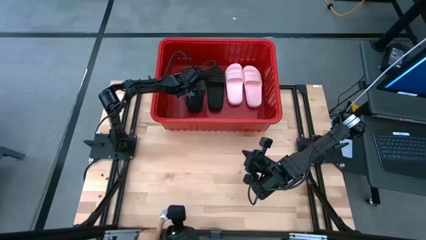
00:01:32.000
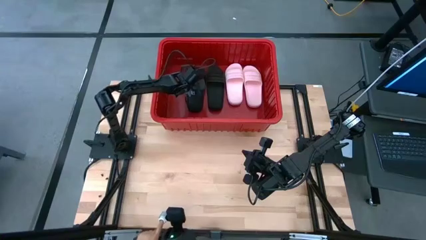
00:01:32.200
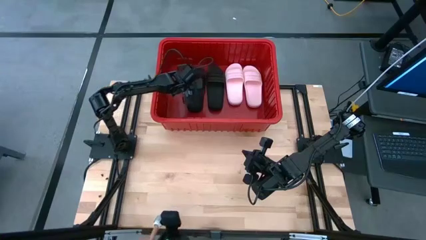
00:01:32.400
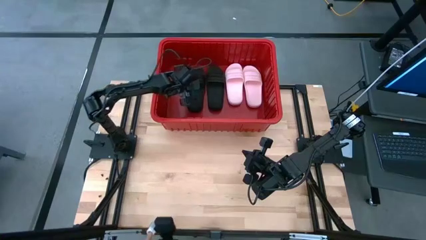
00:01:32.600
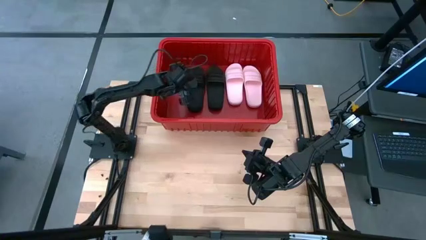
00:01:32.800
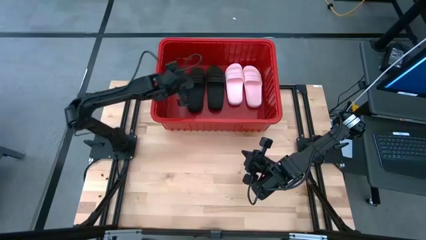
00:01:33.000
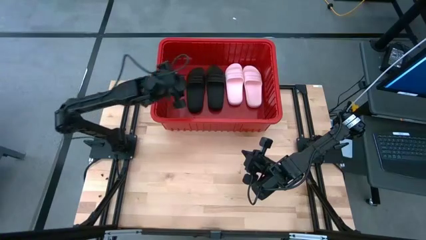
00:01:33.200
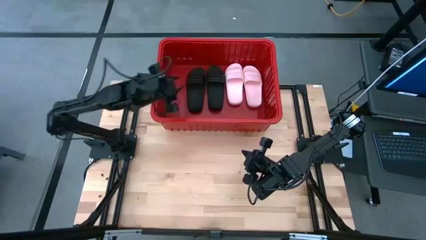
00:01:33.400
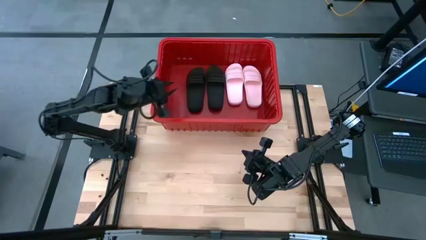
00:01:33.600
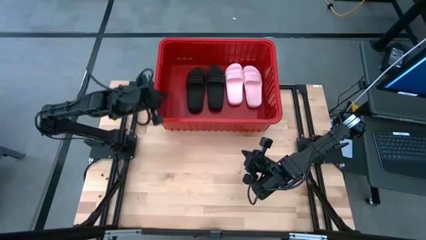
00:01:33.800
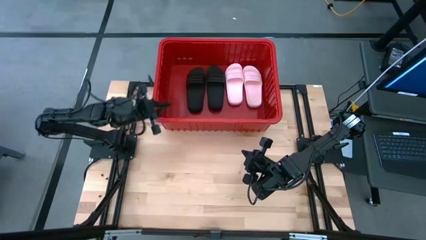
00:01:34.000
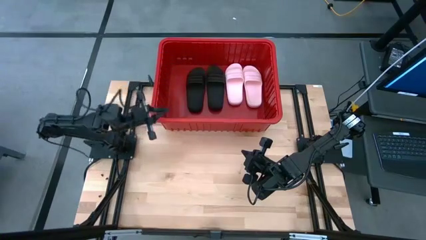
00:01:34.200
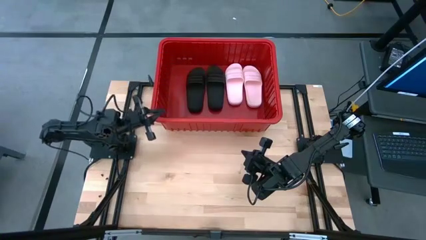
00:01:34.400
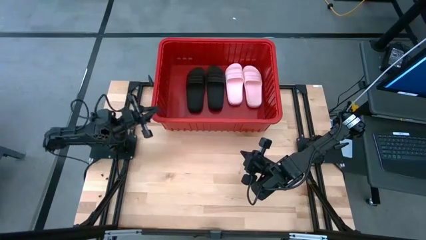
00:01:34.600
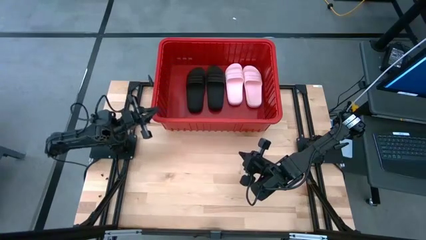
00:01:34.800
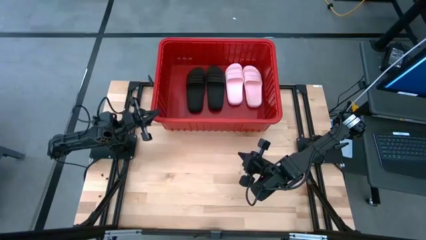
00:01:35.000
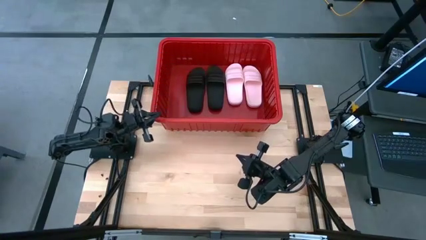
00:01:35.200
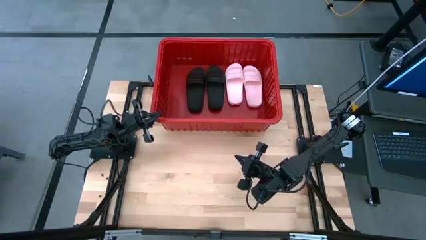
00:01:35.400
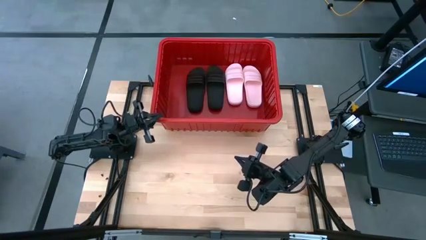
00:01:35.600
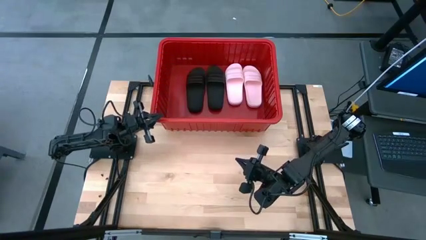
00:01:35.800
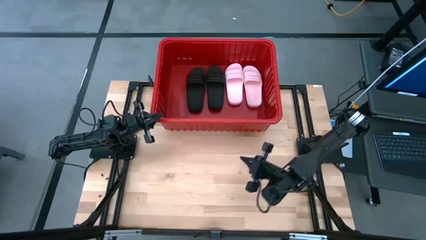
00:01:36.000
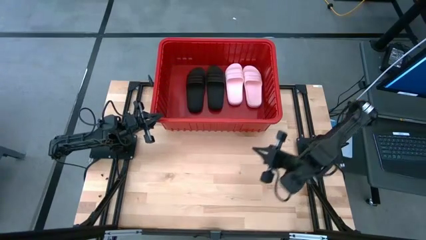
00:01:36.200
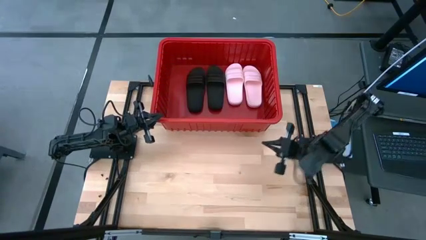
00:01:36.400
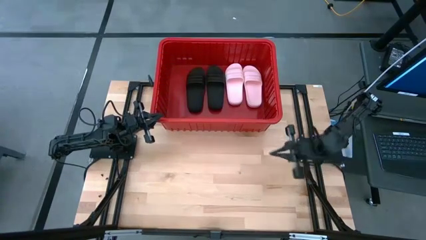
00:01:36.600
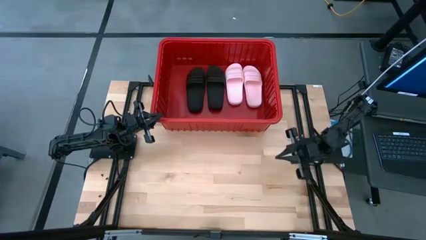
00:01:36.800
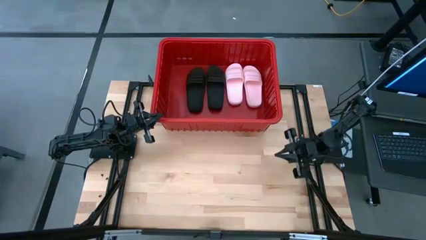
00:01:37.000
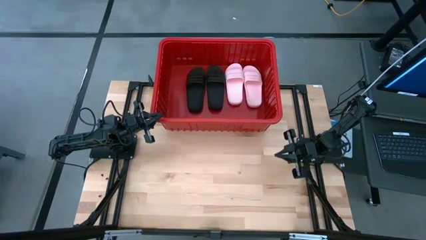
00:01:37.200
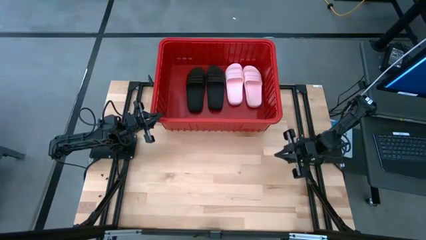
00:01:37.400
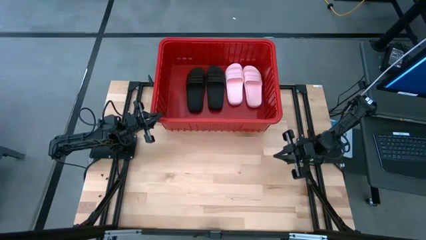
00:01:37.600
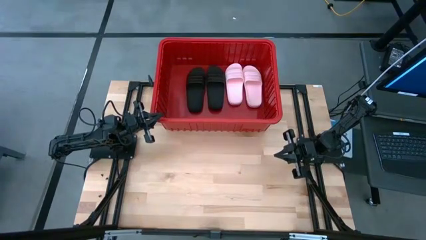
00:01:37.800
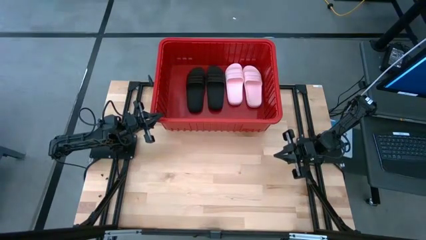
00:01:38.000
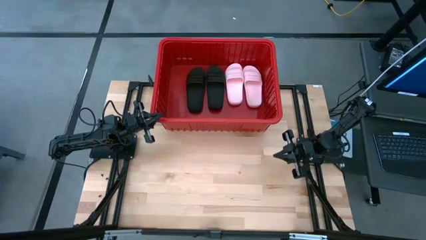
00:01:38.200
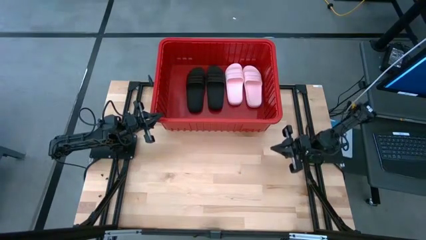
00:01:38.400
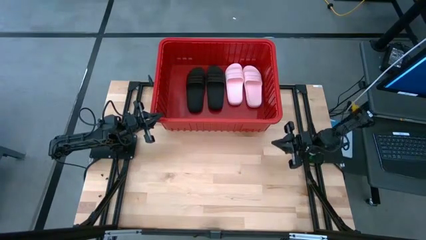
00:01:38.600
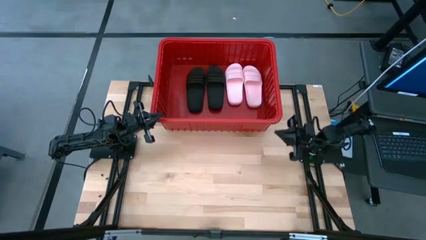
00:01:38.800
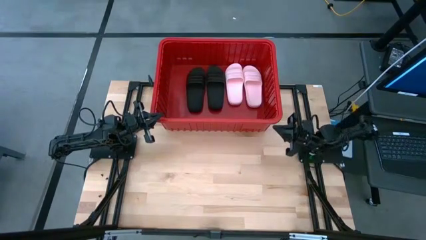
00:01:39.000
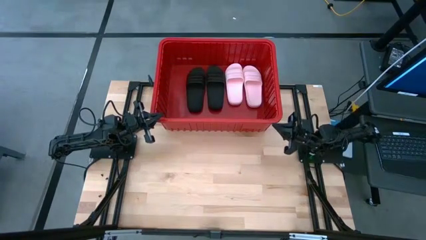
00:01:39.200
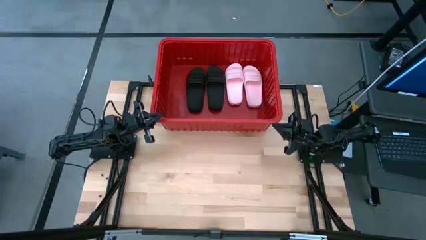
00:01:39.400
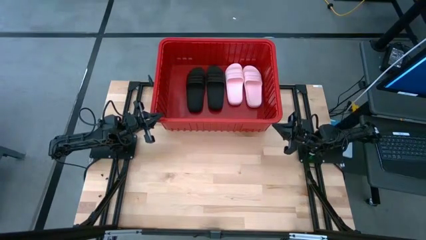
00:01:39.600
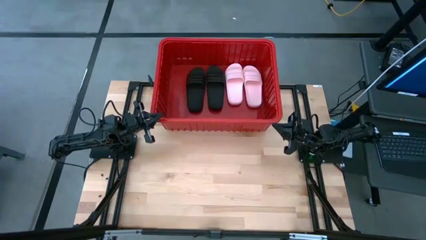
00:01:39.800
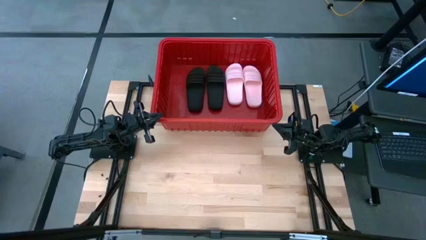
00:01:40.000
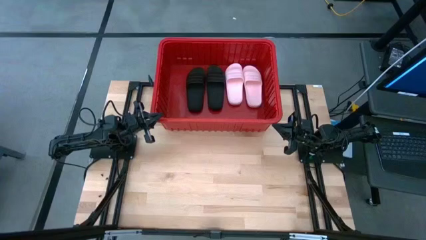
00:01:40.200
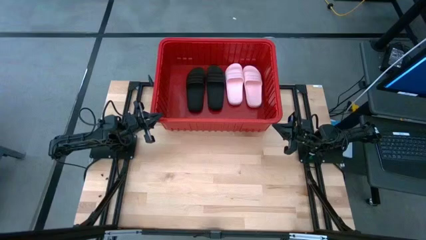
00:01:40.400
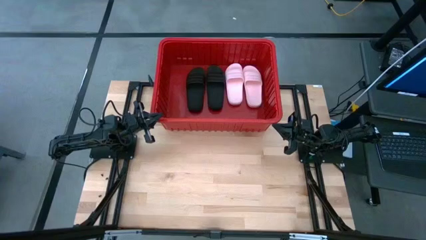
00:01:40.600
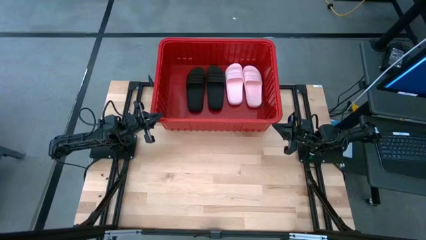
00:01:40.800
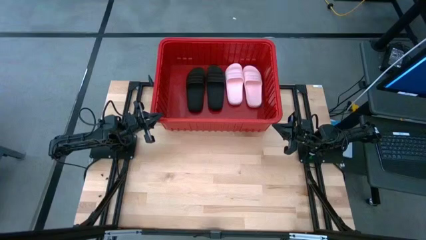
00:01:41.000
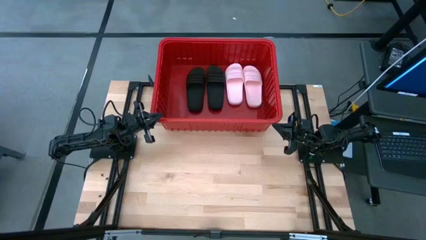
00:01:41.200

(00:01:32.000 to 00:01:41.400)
Task: Pick and place slides into bin
Return to Home Position

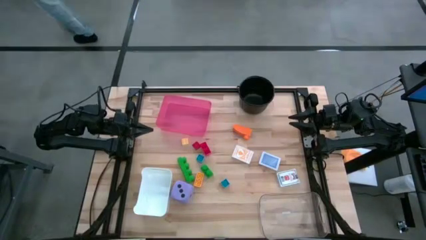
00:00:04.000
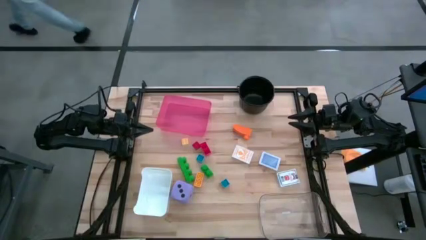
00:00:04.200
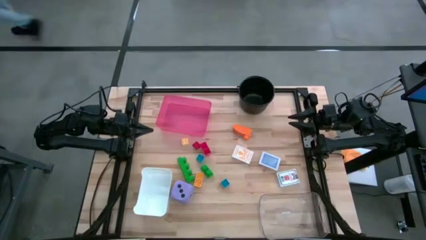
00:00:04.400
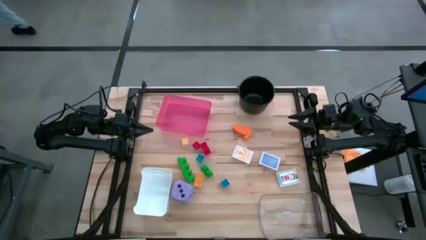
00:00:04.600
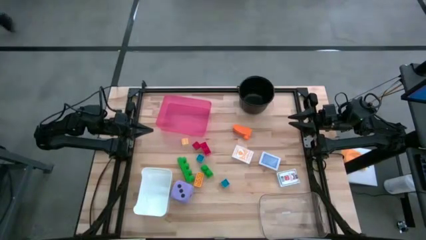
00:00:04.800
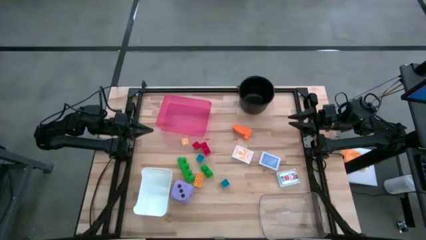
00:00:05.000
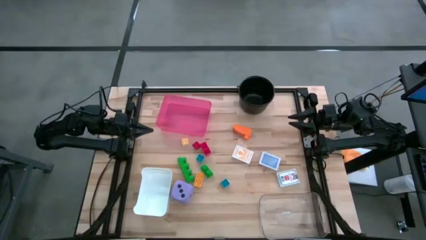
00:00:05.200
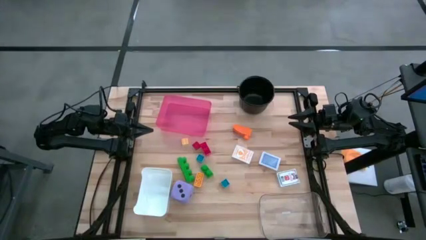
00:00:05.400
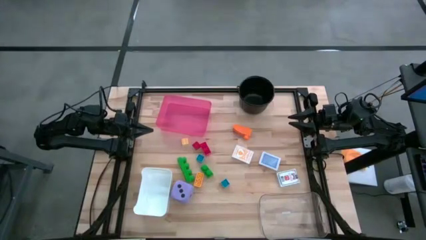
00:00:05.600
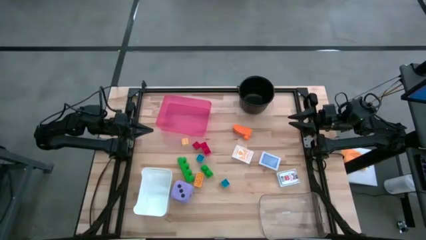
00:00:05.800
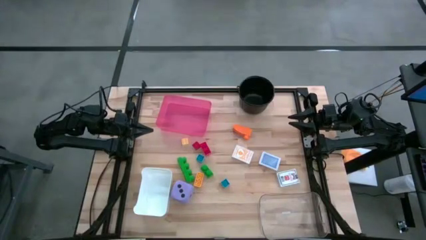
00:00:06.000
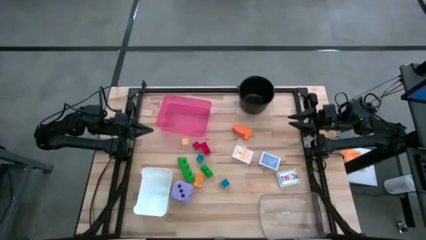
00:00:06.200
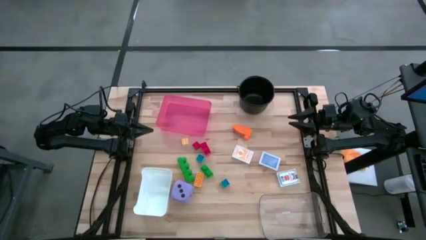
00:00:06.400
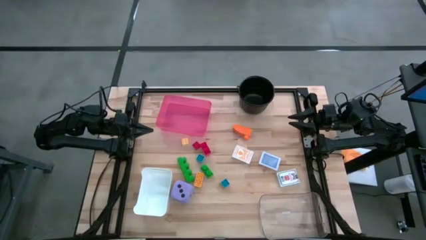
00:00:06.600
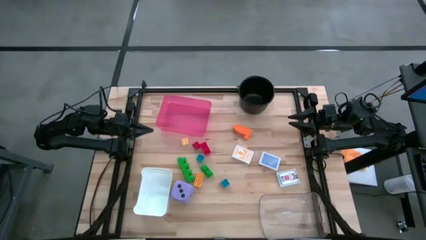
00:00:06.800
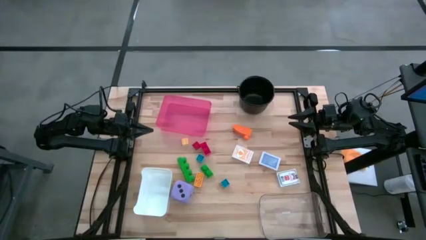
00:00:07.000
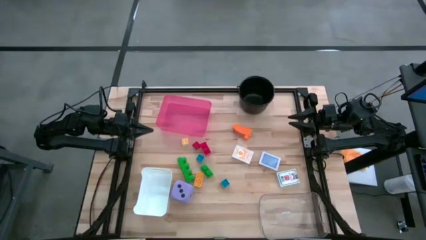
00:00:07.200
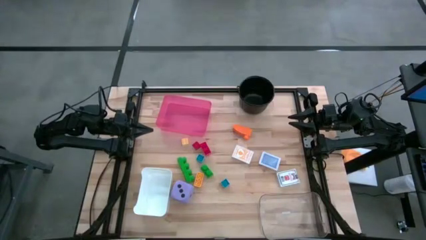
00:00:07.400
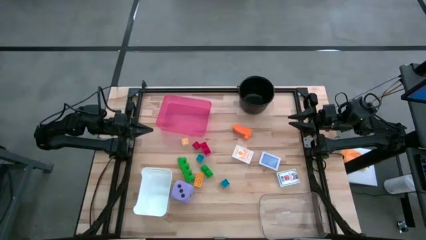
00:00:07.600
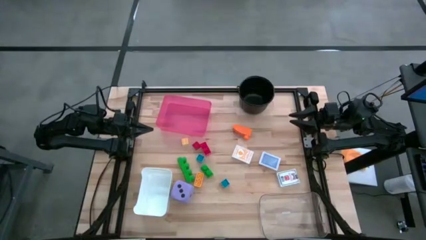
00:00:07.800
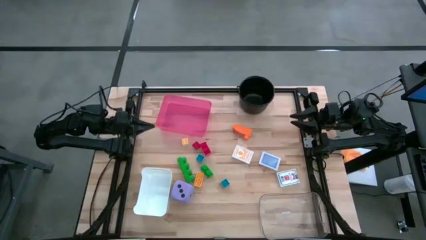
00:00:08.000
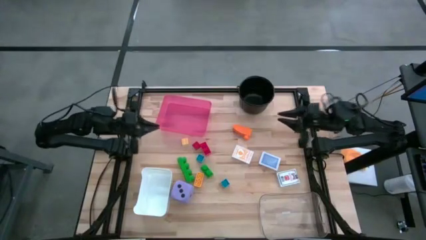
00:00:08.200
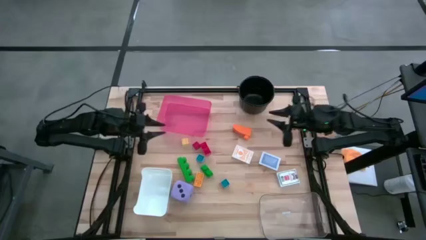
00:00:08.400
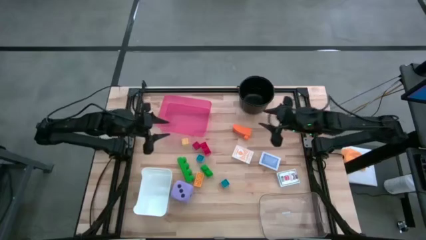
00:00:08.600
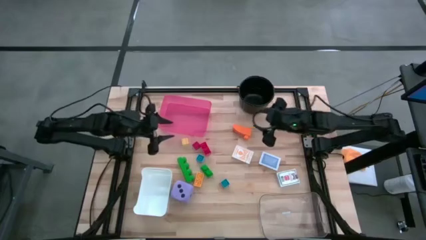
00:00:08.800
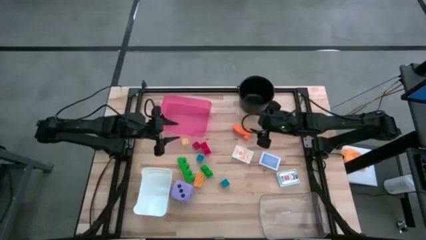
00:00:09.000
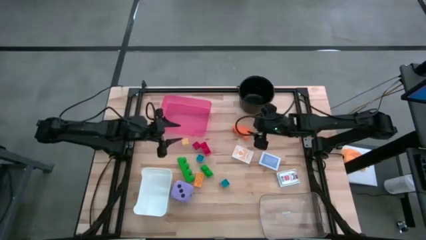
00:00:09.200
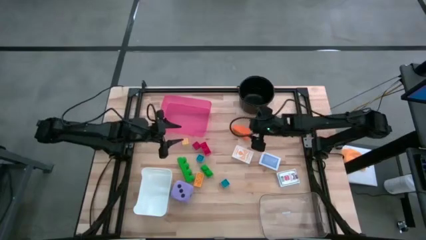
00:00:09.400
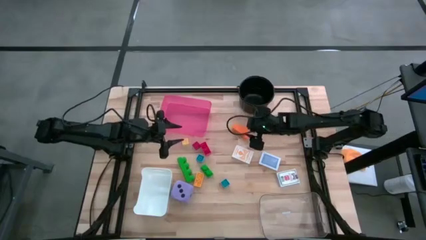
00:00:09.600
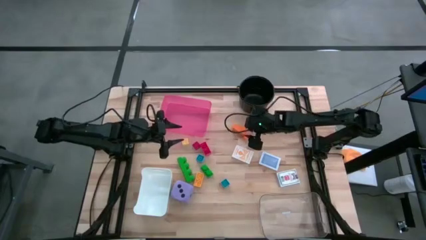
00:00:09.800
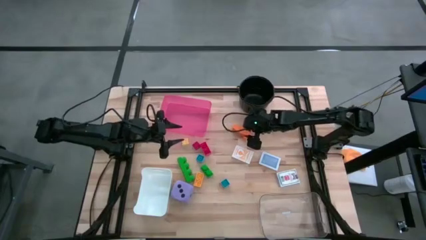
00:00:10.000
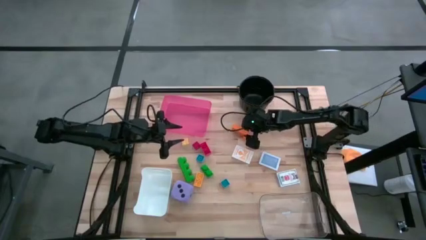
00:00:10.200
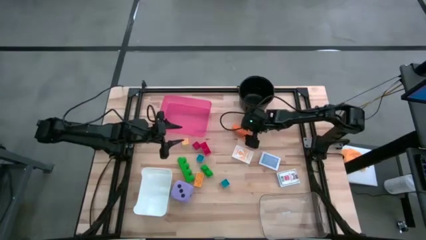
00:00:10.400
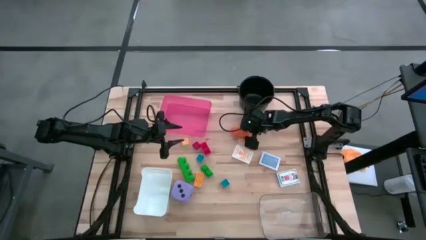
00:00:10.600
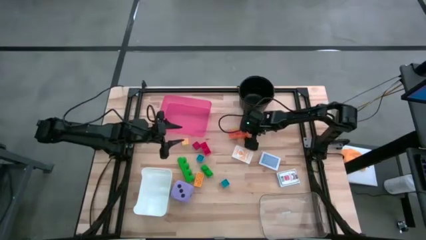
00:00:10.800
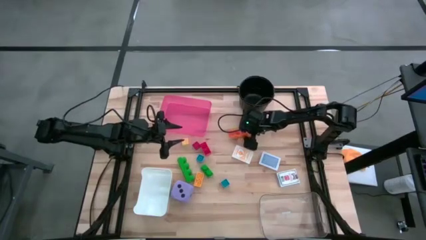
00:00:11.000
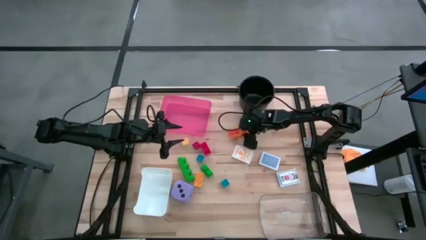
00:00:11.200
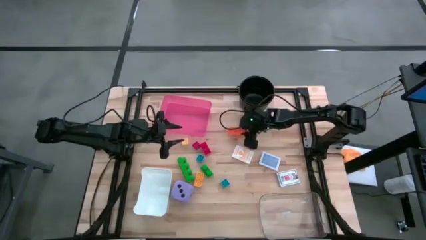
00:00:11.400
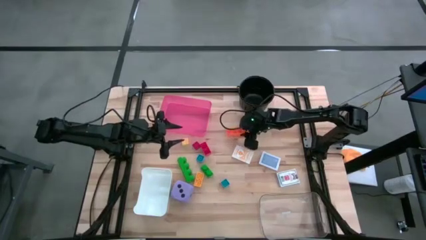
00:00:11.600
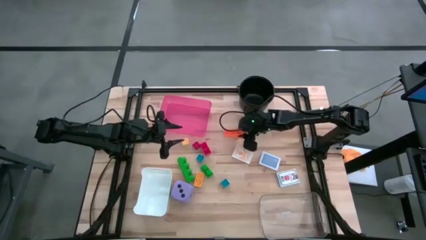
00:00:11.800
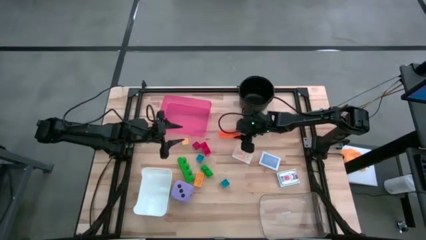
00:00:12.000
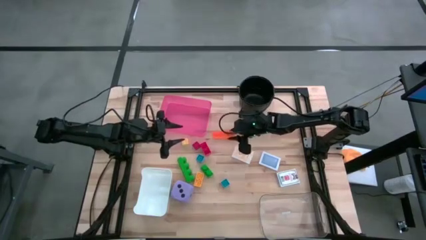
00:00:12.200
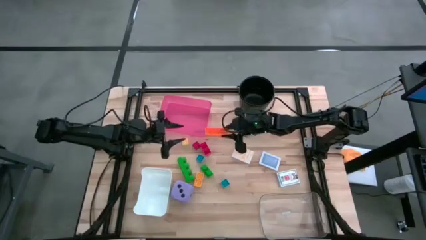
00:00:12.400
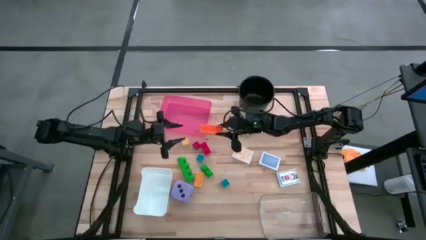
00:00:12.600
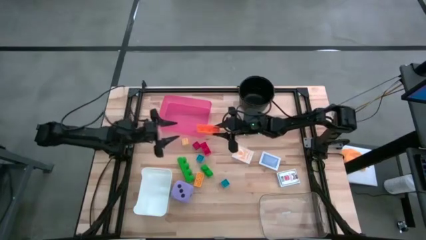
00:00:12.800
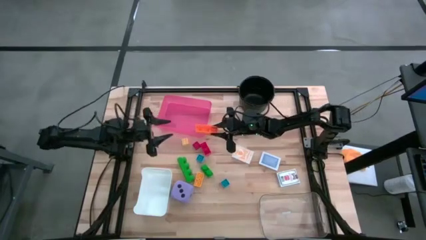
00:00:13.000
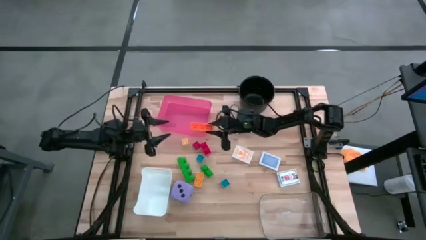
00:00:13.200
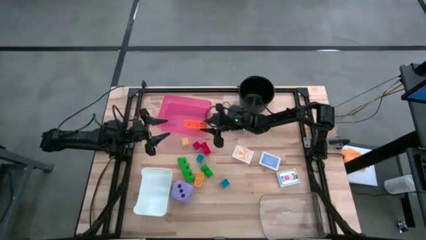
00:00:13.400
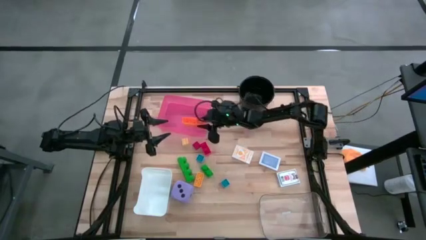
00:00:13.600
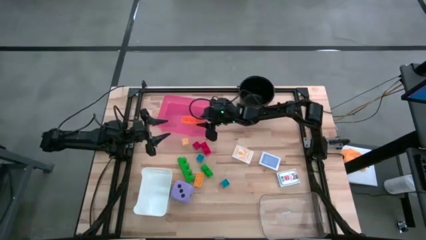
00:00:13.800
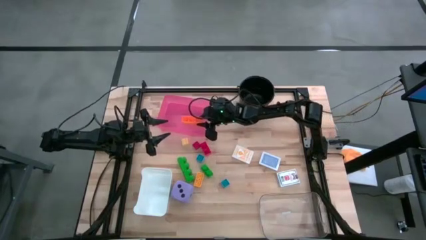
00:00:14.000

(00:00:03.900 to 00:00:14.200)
Task: Pick & Place Toys
Put the orange game piece into the red bin
